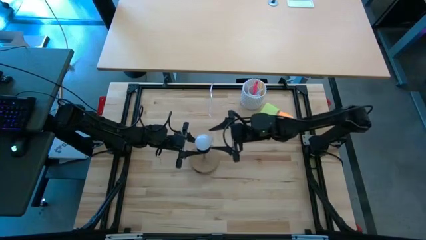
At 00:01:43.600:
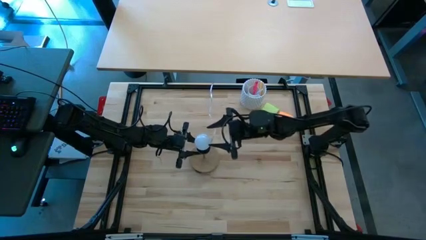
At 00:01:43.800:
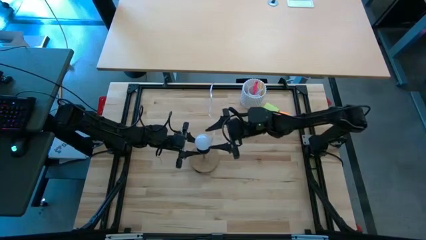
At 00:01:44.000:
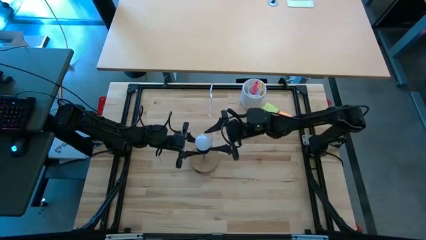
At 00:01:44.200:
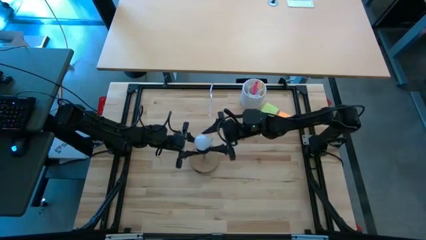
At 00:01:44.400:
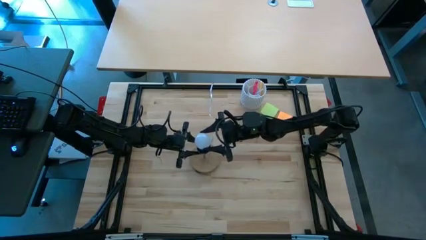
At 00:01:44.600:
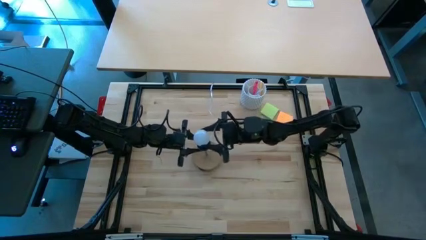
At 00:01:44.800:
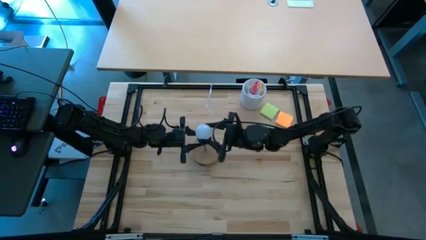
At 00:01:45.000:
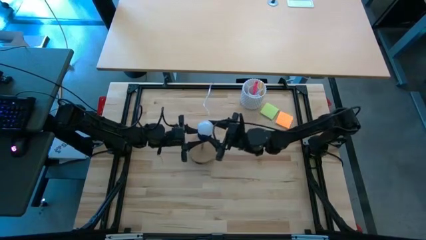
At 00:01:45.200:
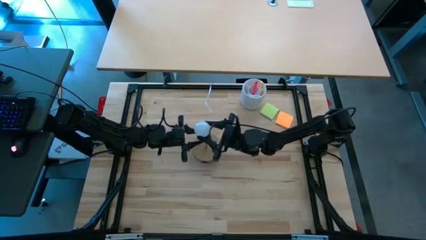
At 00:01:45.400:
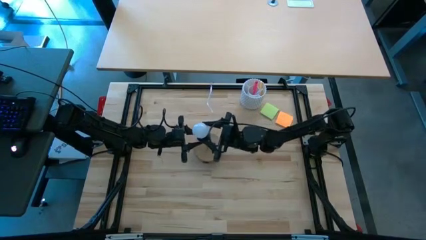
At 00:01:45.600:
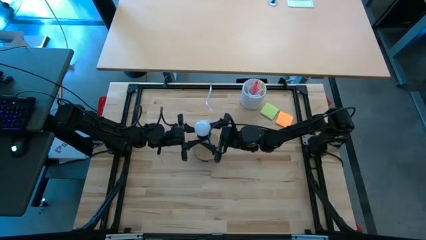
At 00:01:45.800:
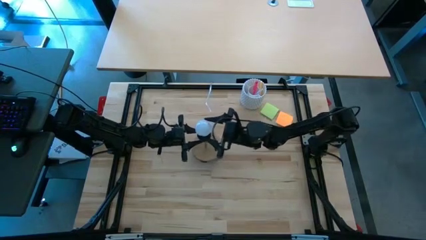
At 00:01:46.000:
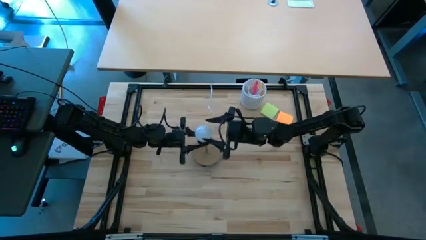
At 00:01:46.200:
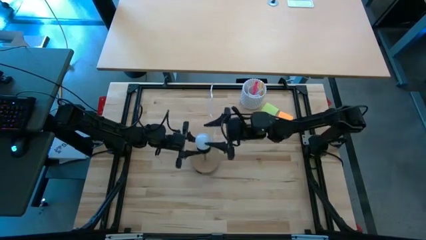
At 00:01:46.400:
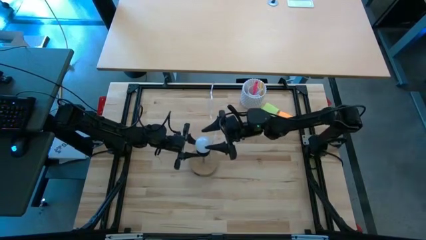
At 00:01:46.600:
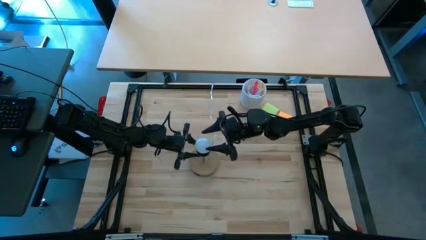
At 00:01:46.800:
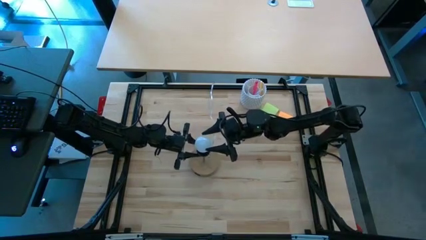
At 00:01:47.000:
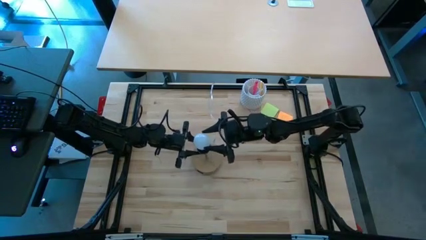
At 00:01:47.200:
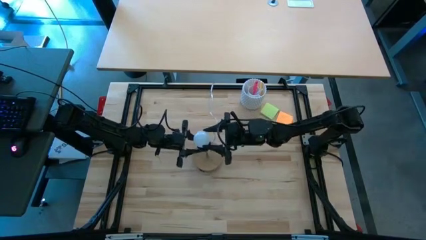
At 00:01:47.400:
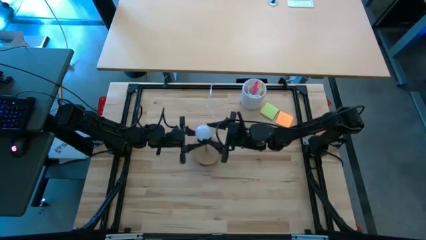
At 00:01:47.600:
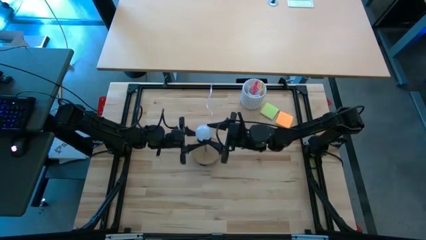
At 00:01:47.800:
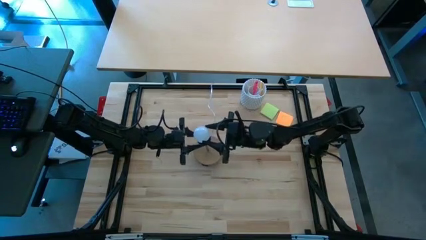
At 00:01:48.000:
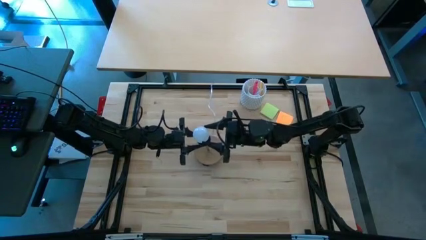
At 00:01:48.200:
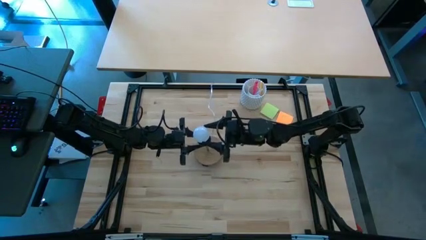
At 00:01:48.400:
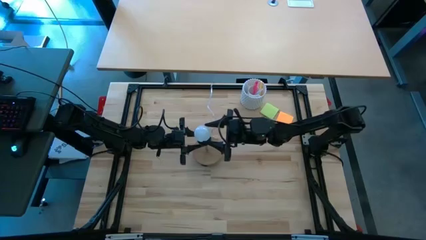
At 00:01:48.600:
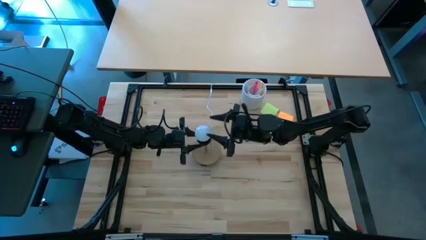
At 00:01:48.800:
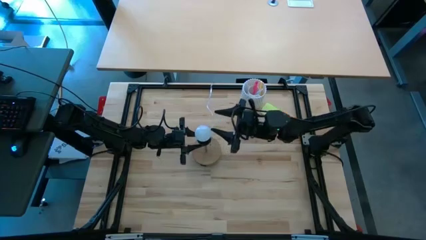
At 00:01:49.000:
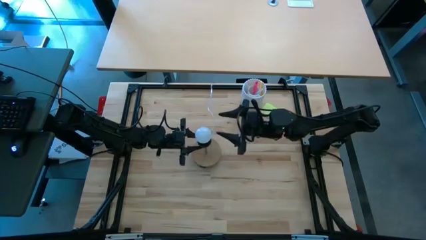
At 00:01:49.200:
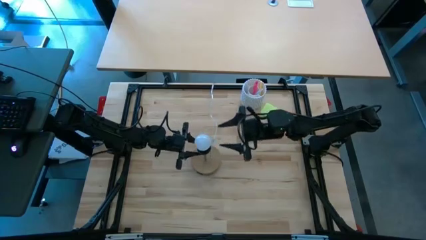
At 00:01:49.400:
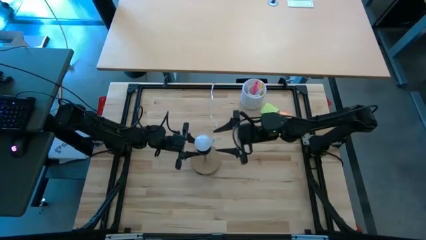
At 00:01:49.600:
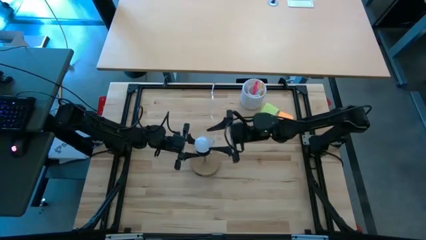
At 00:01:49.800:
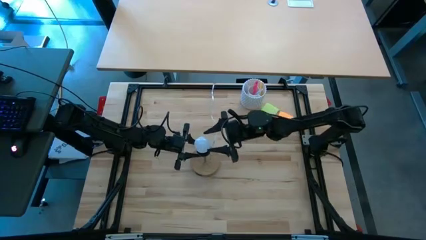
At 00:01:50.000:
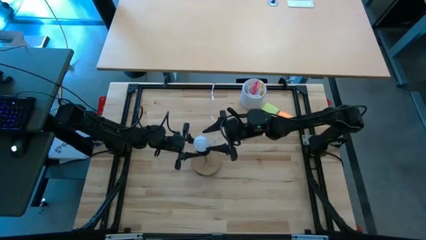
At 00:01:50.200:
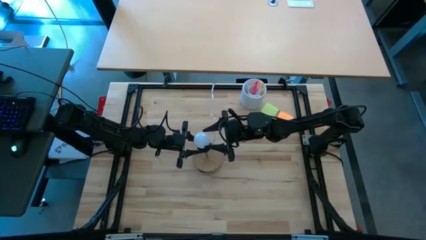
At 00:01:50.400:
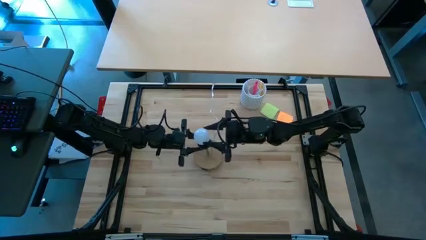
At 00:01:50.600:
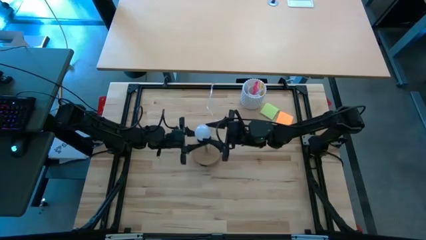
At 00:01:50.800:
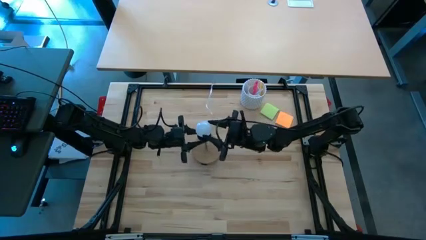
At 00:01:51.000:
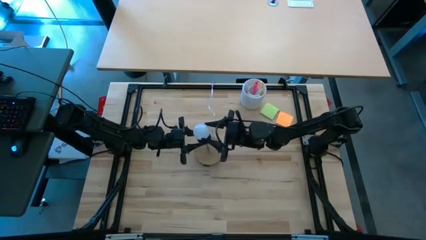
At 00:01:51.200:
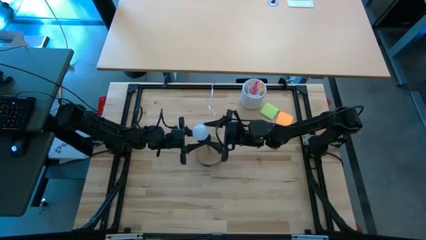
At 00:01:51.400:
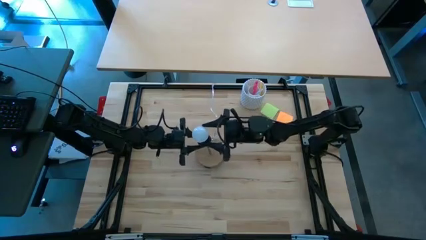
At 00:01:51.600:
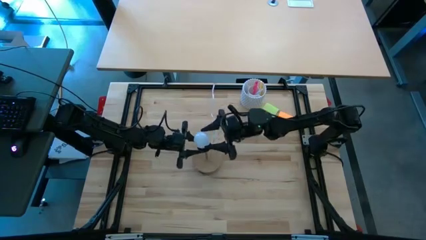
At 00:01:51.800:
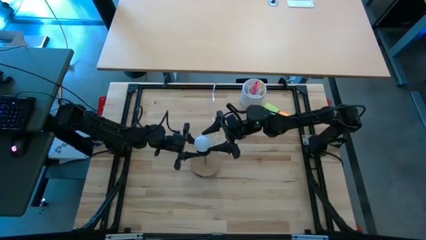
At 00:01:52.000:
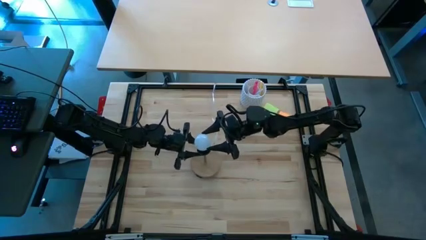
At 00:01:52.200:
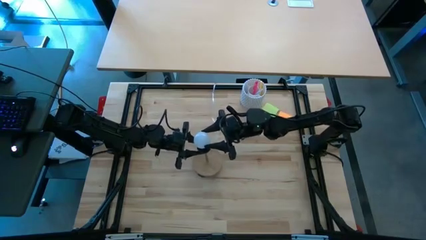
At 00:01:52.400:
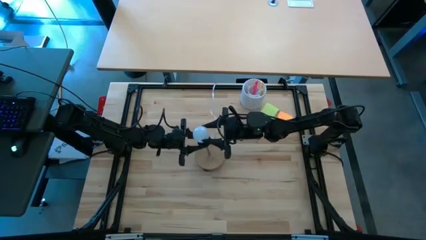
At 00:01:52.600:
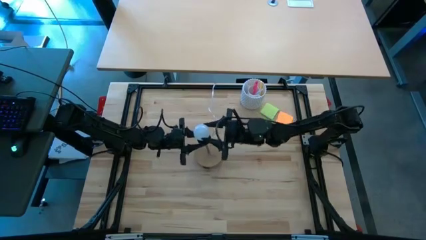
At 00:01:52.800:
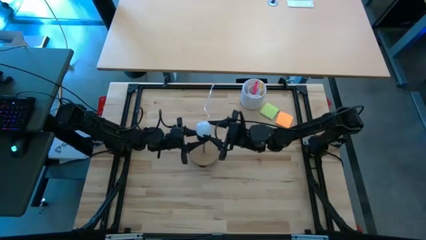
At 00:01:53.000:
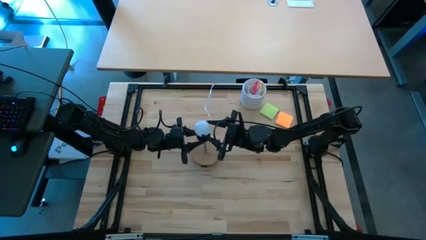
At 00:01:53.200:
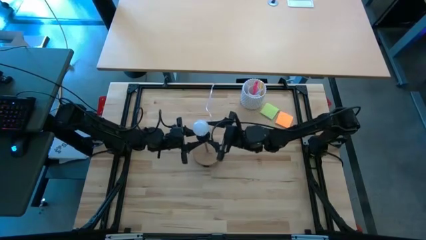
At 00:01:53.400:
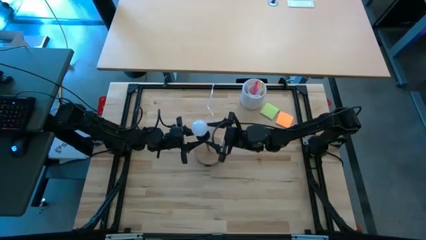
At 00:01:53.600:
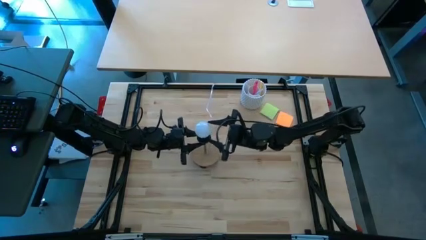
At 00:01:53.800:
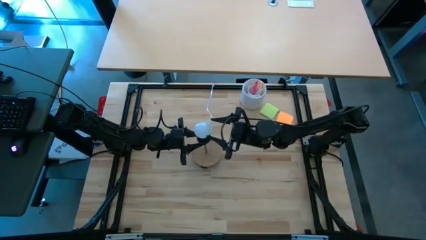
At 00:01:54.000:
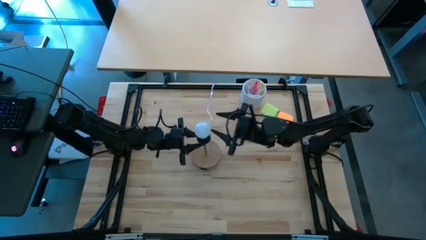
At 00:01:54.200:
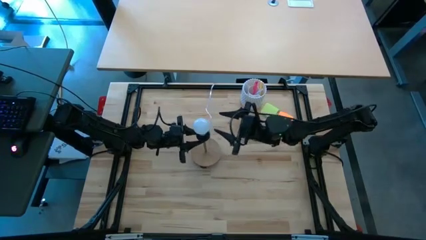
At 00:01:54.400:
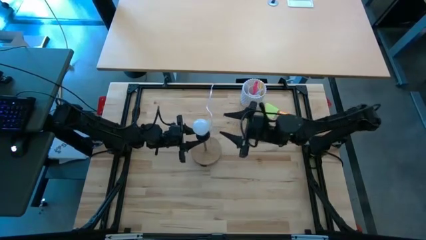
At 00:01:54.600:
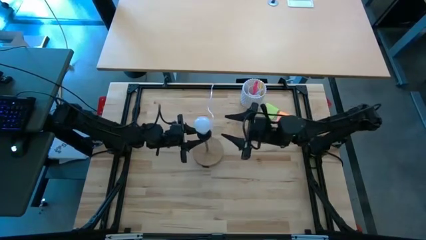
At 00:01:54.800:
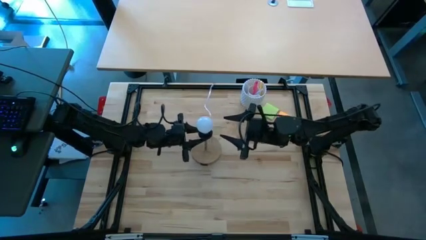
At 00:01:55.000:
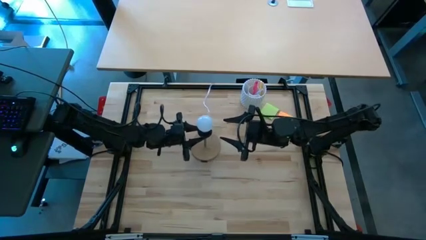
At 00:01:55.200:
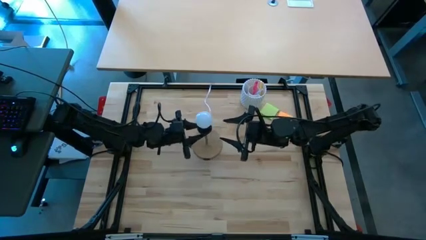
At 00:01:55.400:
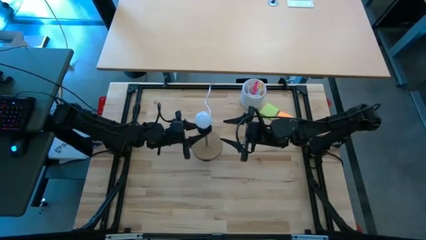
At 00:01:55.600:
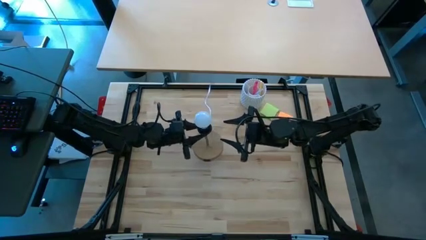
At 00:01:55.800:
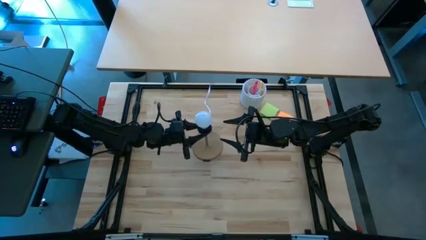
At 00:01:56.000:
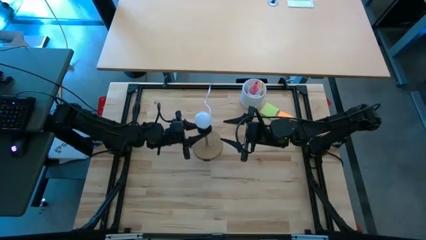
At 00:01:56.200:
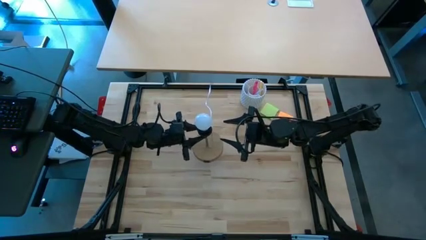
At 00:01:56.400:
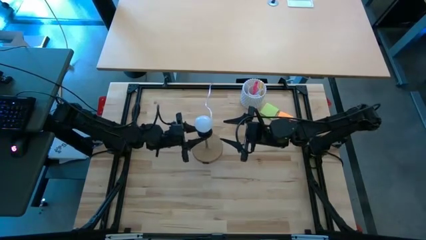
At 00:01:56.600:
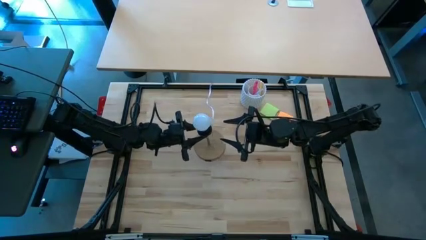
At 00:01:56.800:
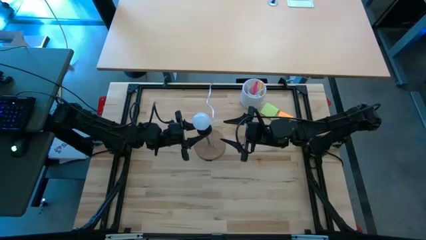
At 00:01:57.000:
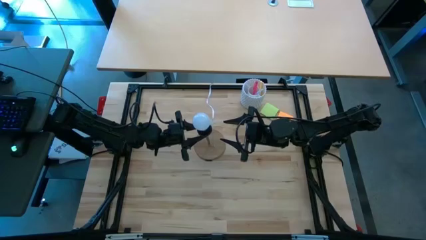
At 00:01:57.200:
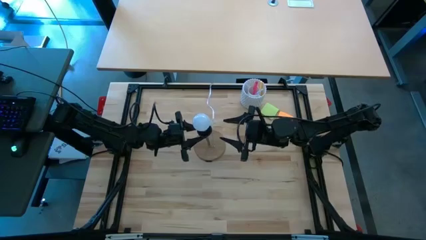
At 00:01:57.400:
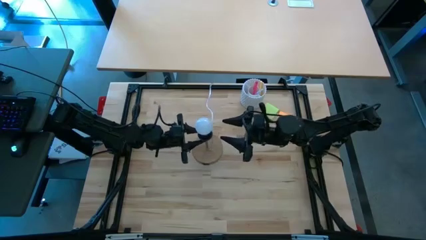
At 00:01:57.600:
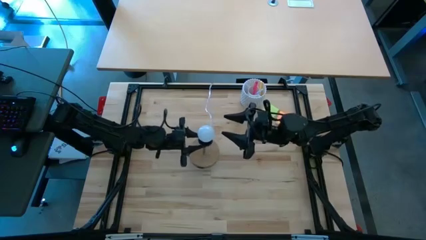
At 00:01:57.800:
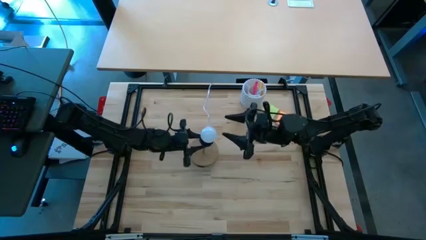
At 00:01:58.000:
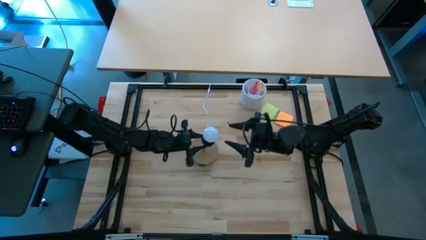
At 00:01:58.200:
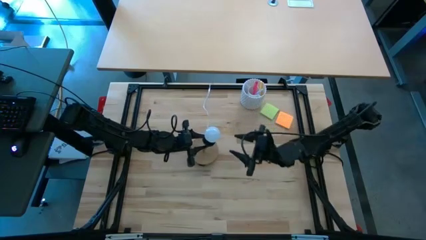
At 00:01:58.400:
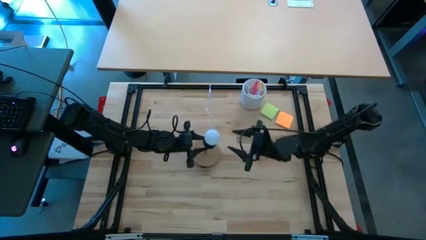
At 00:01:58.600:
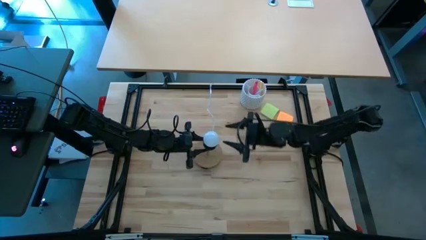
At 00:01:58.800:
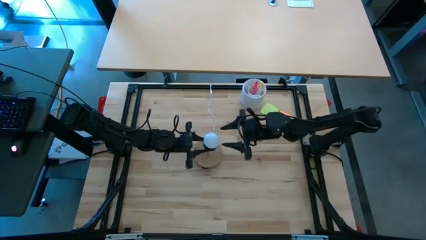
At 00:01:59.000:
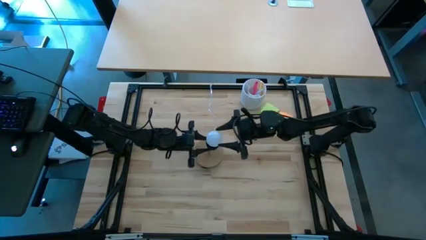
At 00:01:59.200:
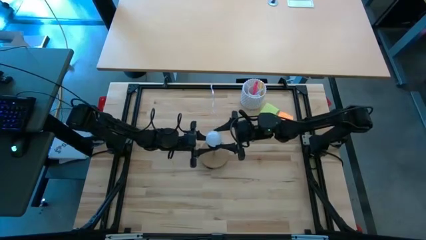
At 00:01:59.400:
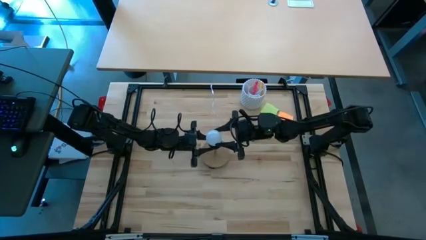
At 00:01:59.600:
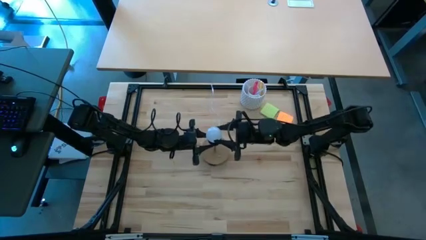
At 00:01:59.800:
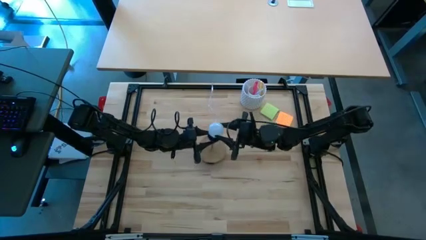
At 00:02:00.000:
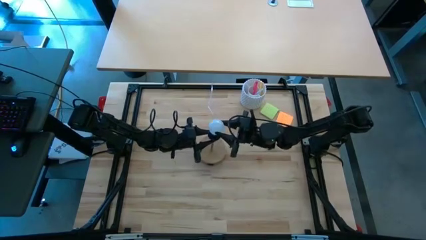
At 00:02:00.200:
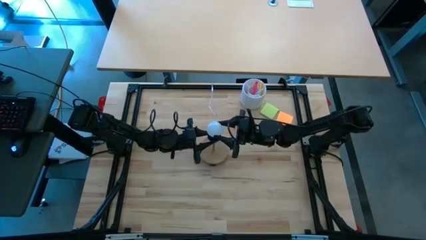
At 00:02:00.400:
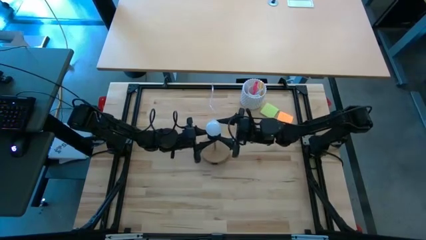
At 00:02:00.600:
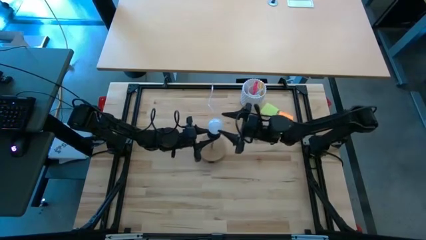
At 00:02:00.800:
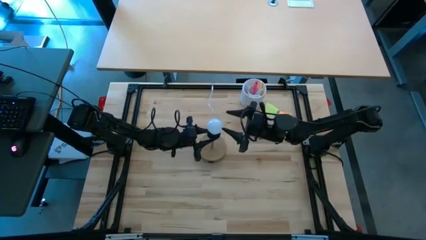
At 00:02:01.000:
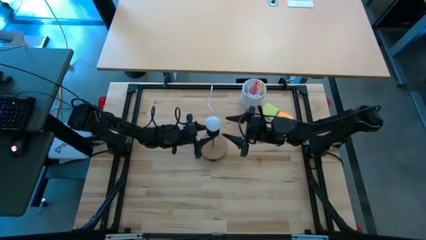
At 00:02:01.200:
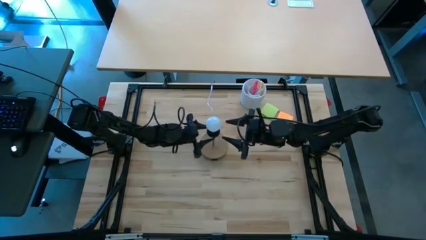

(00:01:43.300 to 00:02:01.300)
Task: Screw lightbulb
Insert the light bulb into the lamp
